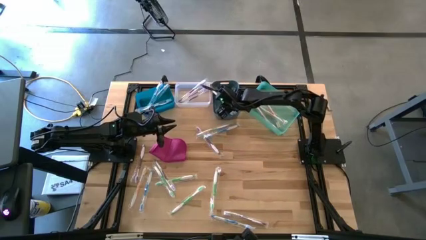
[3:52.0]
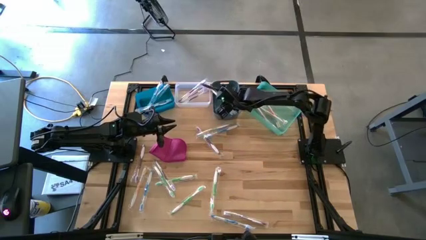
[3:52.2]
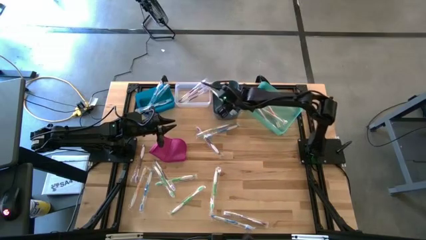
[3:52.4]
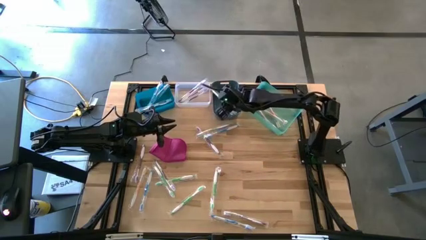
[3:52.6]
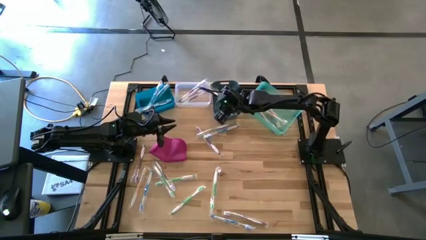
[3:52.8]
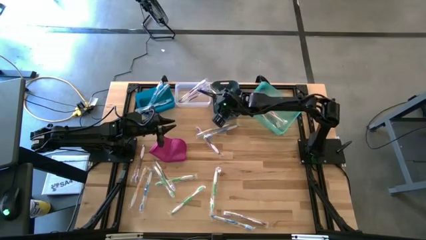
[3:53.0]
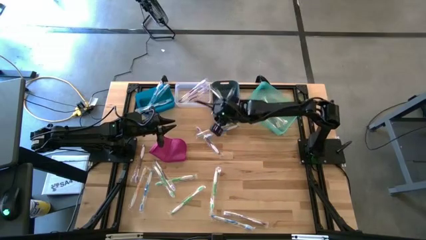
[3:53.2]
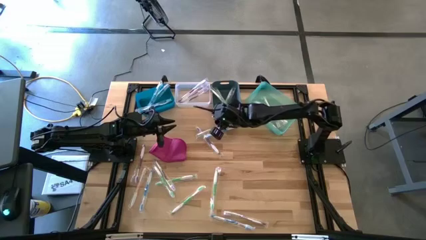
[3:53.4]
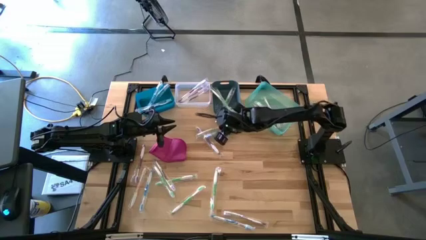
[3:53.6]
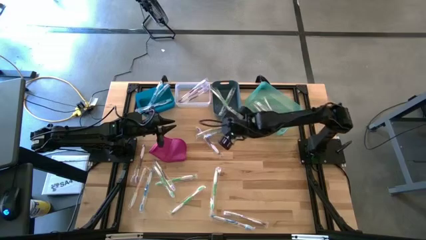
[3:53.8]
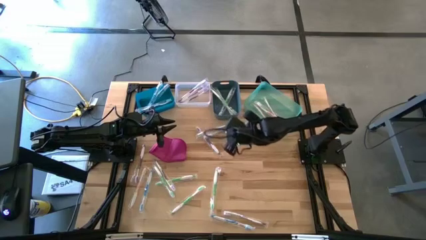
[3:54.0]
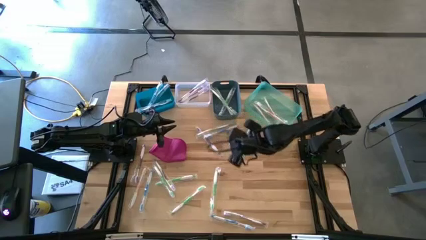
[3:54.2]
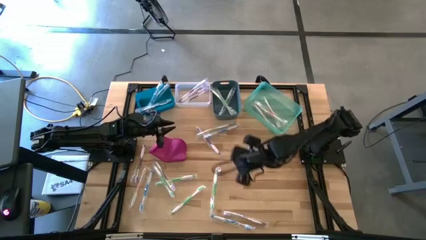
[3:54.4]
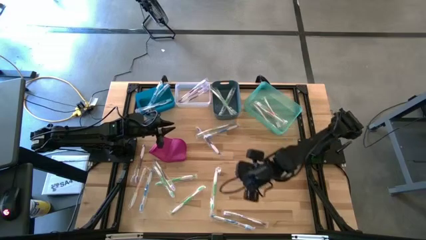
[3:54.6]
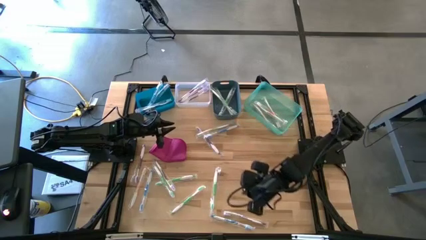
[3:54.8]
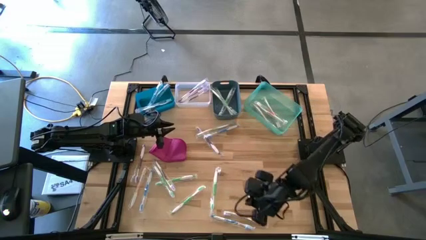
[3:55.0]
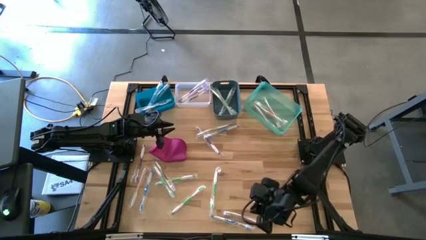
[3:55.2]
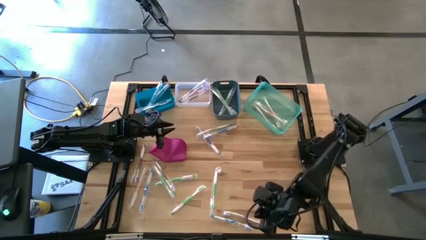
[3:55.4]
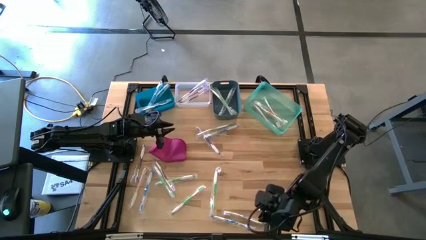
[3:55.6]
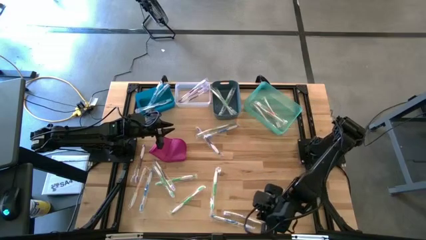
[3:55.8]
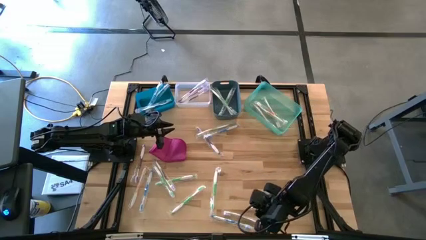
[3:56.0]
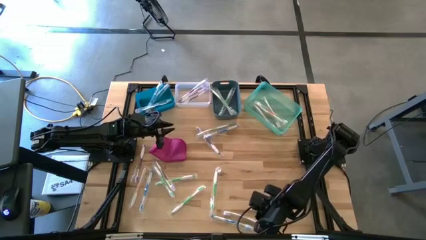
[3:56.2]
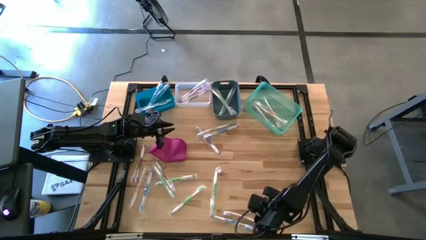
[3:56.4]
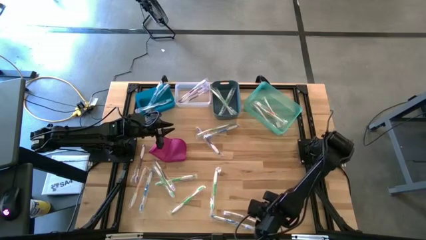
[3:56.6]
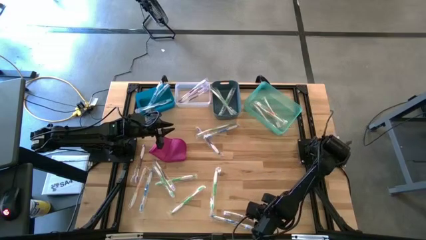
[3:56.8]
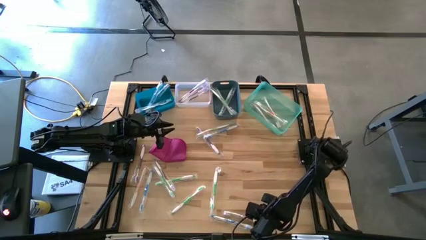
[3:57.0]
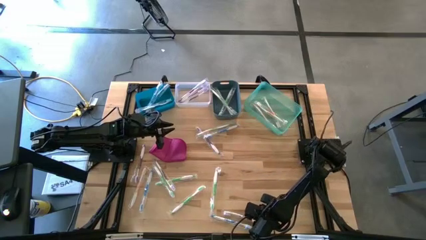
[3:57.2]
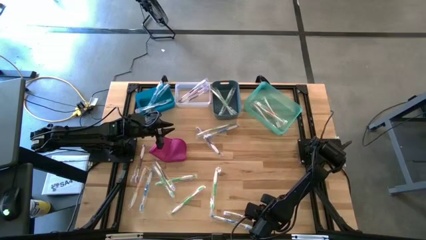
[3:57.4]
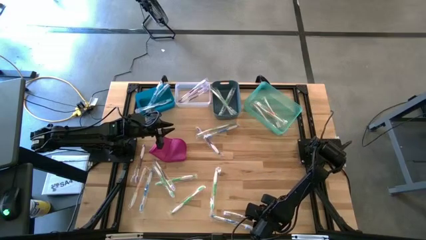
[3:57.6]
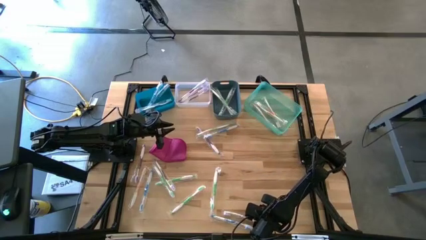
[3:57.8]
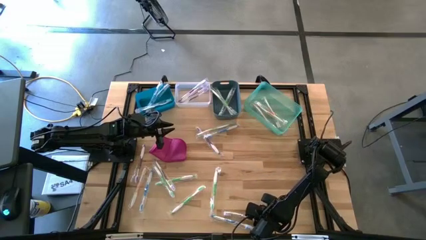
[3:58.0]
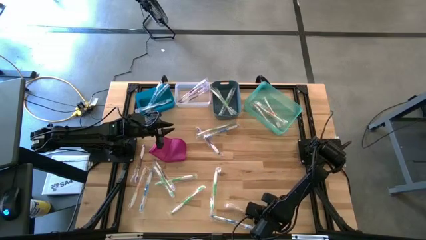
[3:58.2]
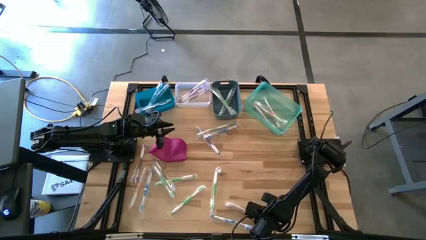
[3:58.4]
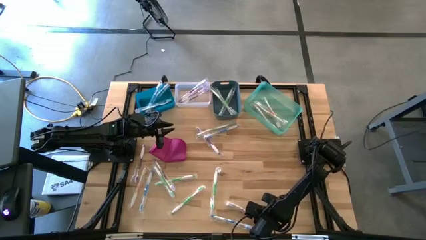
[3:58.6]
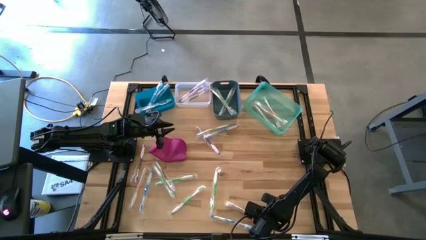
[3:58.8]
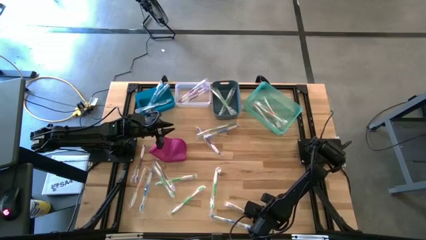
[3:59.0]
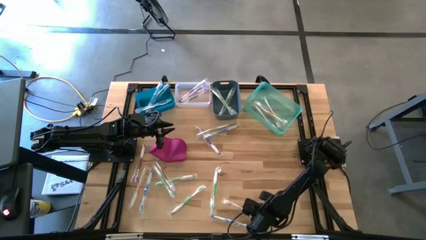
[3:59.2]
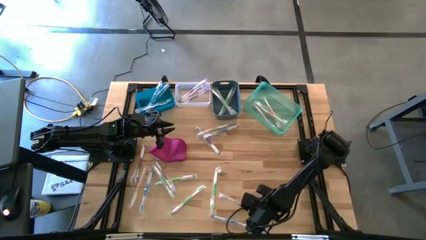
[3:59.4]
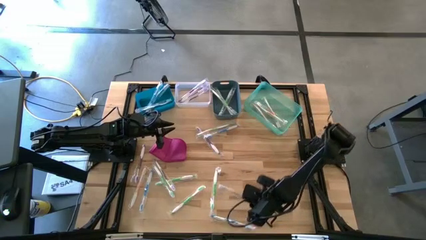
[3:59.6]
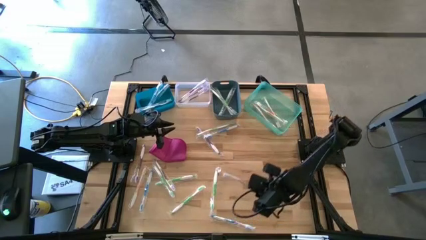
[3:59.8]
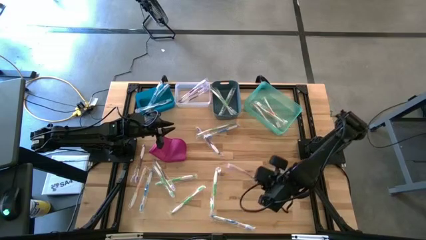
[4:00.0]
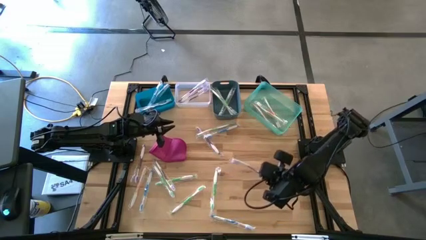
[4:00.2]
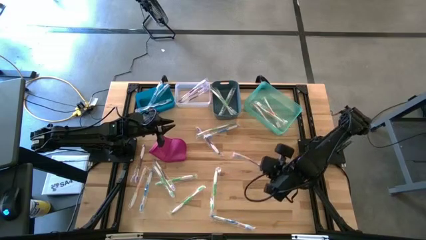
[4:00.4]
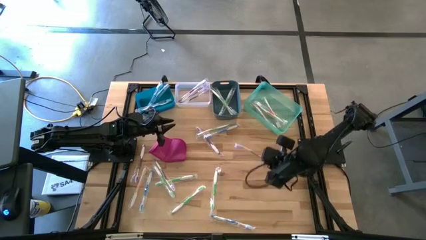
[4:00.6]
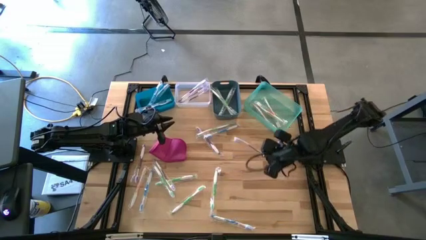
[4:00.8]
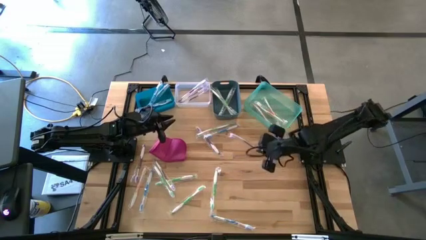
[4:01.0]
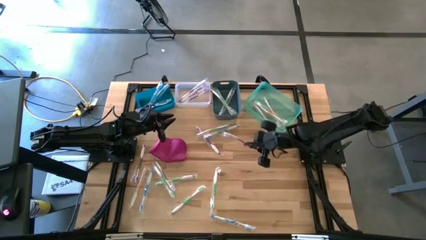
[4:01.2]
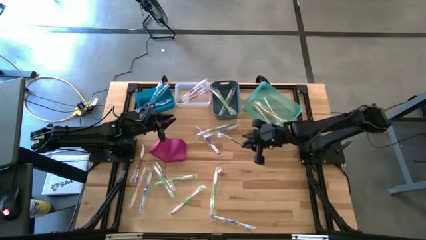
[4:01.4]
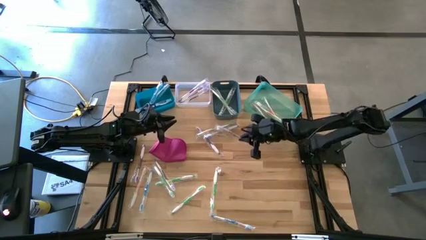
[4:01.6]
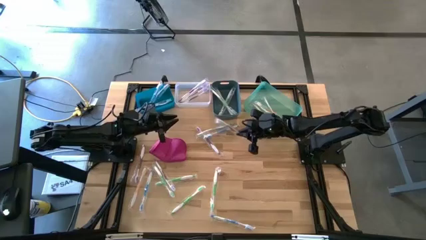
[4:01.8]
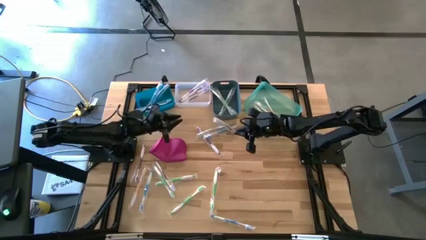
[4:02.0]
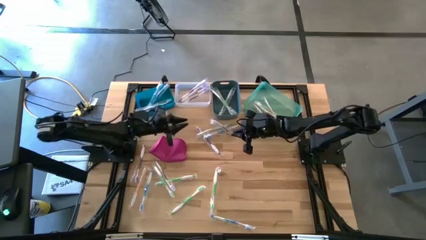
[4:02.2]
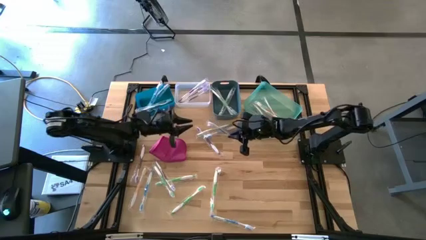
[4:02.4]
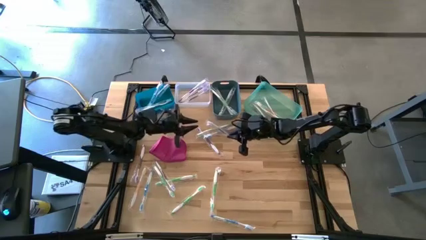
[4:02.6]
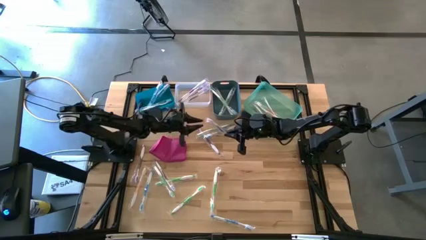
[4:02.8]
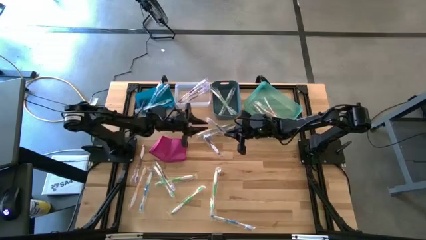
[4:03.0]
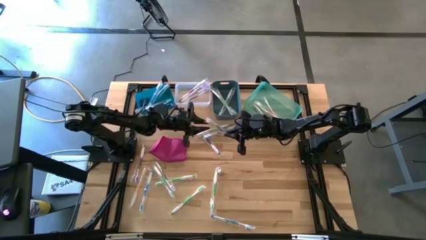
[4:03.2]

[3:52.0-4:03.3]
Task: Pick & Place Toothbrushes
Put the violet toothbrush into the white bin

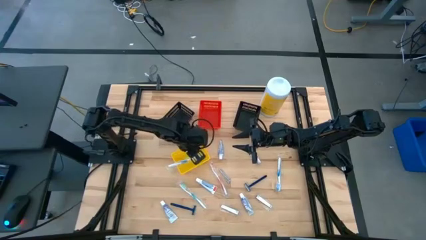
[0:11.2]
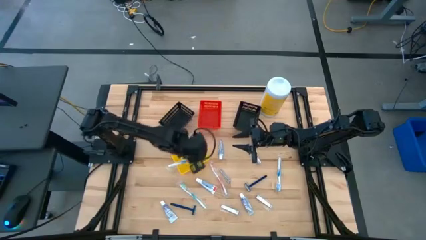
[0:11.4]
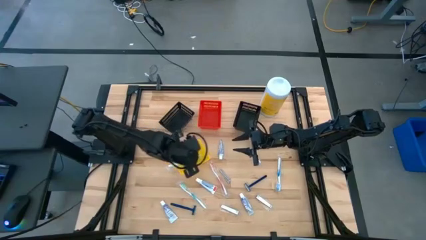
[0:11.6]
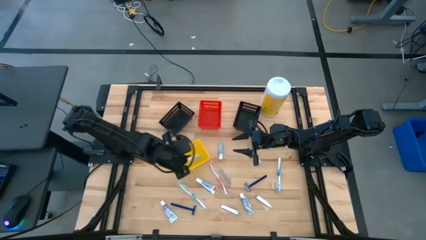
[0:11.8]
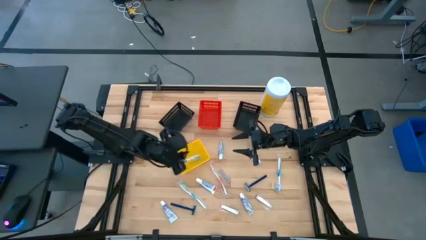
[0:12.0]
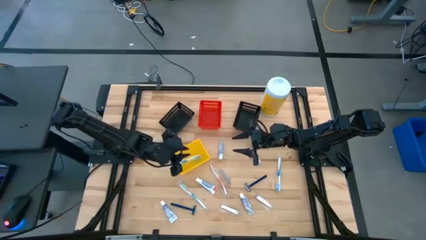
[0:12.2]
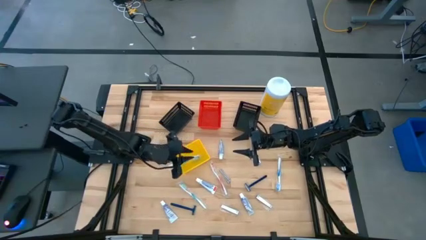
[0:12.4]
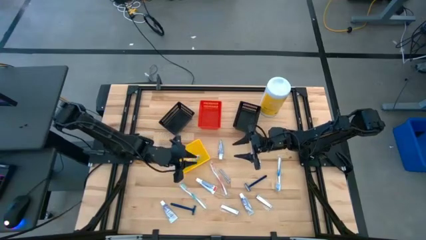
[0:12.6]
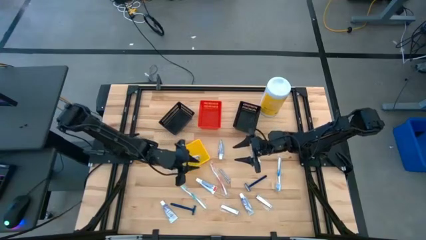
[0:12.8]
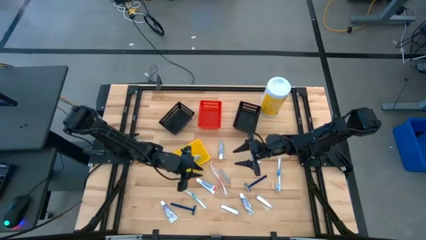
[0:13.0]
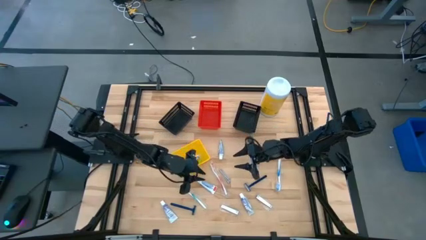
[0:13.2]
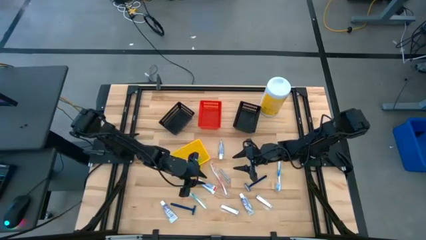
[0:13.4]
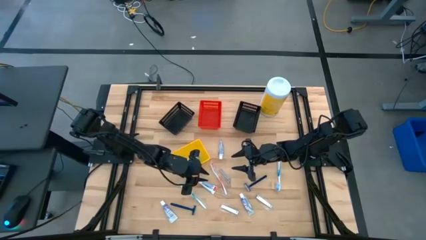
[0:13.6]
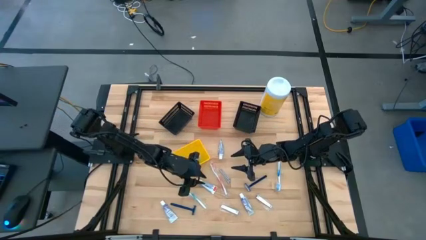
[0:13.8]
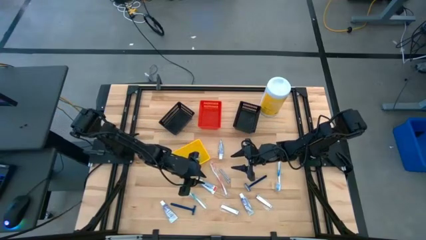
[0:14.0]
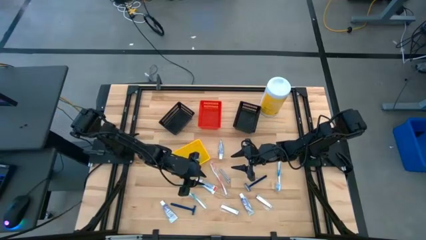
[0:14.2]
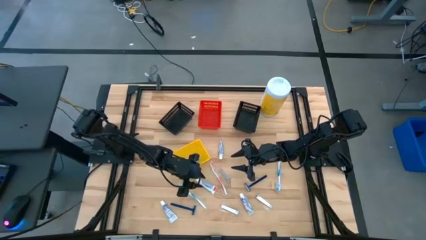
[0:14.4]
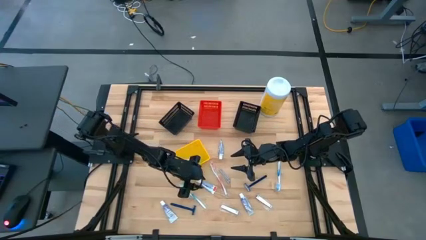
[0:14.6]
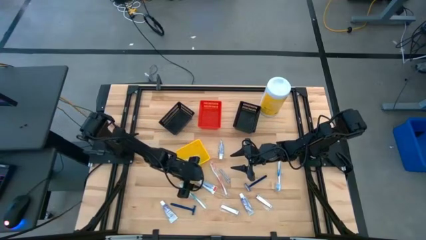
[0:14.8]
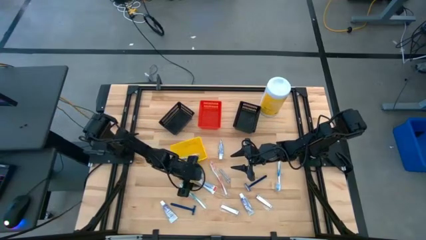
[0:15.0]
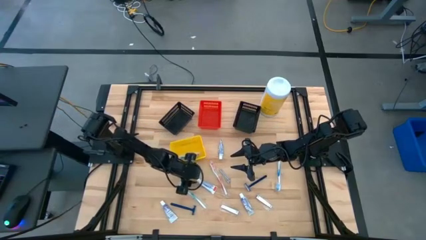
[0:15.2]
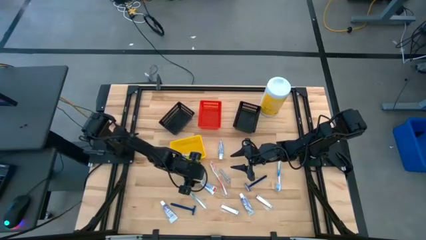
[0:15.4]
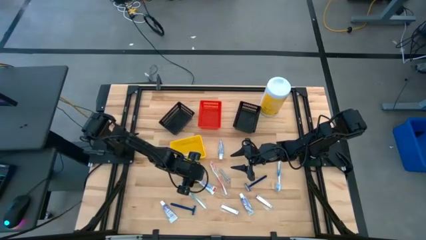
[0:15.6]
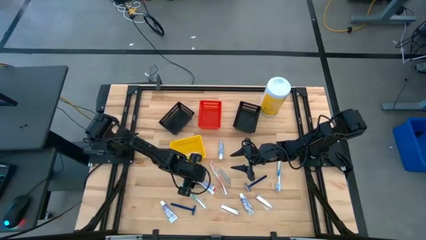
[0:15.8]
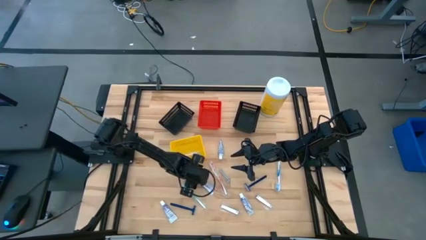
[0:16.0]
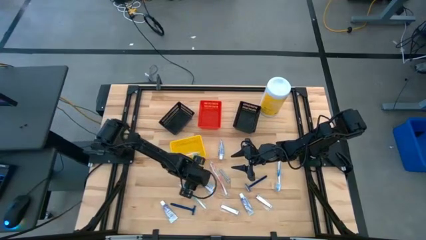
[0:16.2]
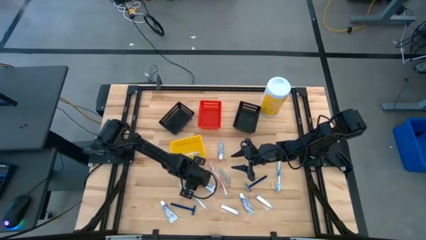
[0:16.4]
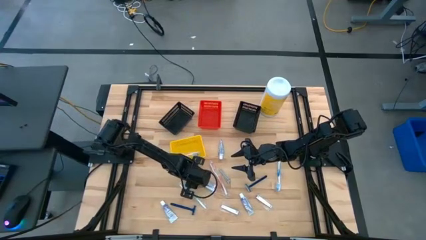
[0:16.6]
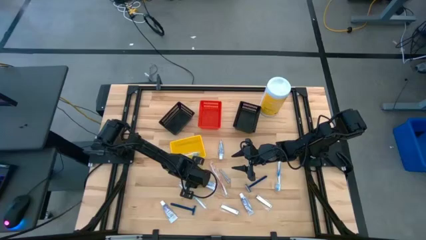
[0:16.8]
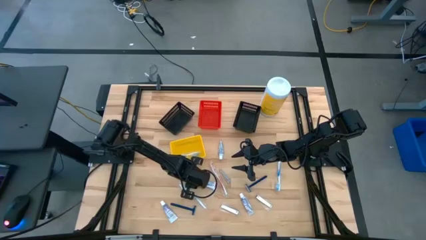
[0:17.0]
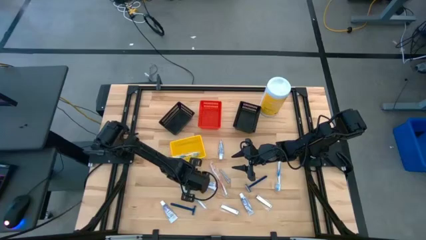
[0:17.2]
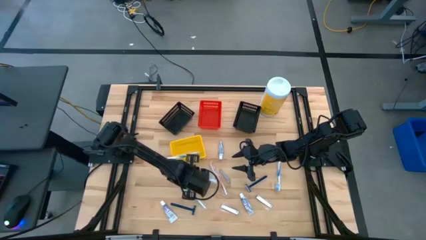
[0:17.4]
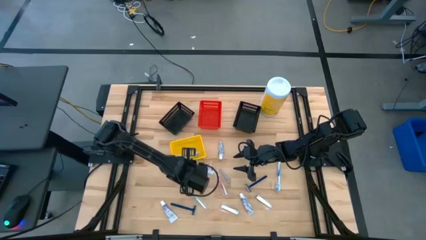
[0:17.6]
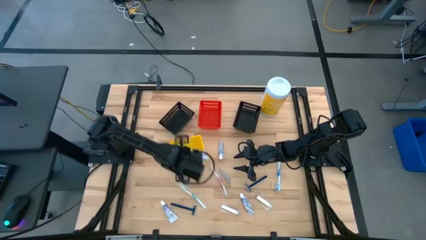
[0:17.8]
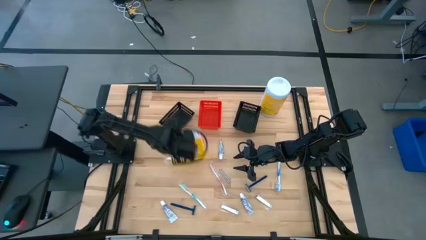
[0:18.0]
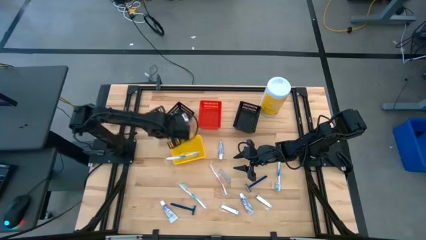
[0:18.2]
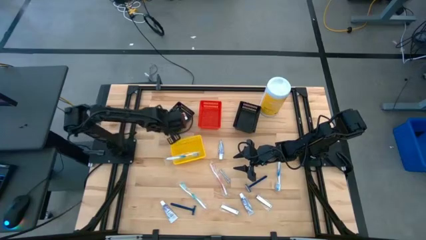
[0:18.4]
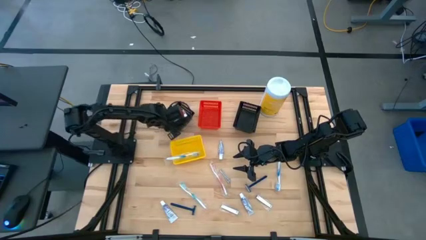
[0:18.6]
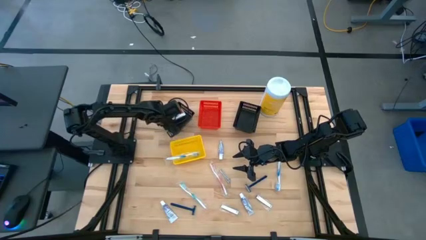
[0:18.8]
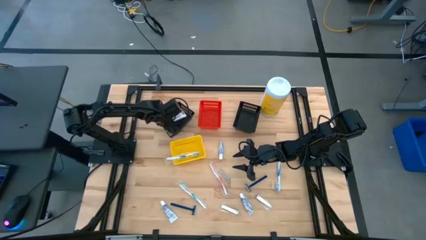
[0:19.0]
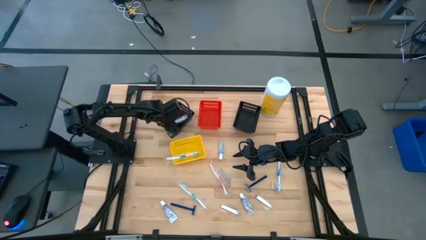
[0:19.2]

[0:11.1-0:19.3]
Task: Pick & Place Travel size toiletries
Put the white toothpaste into the left black bin
